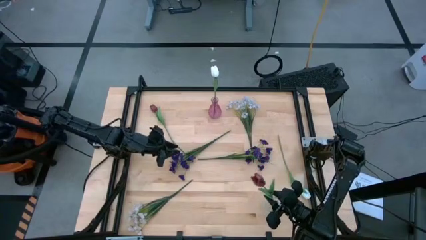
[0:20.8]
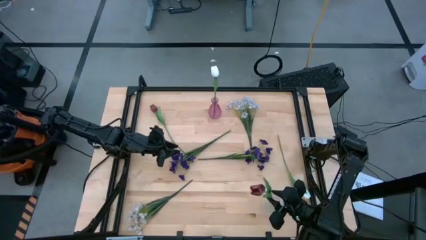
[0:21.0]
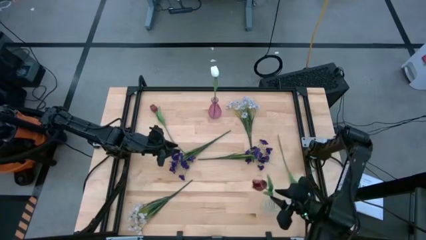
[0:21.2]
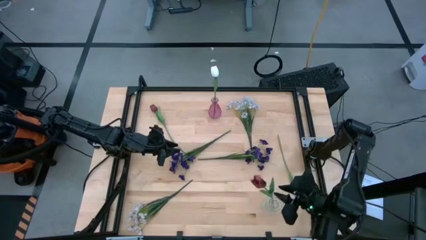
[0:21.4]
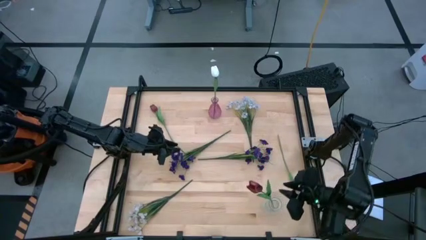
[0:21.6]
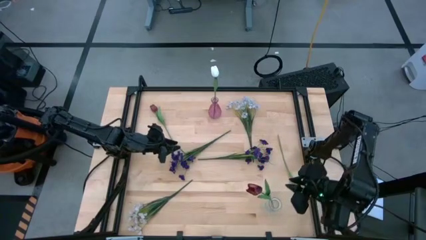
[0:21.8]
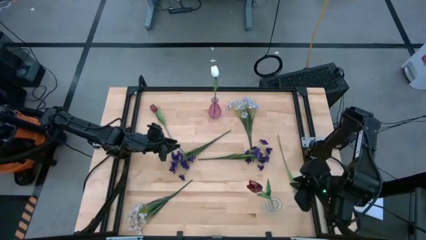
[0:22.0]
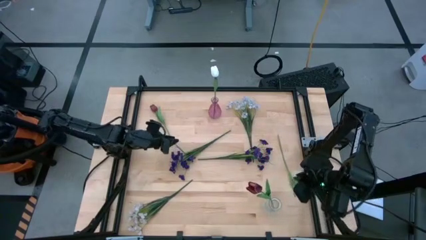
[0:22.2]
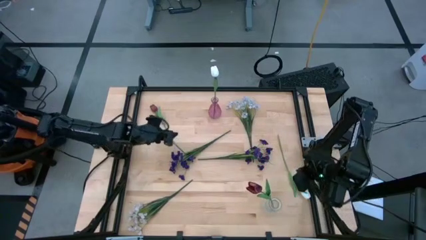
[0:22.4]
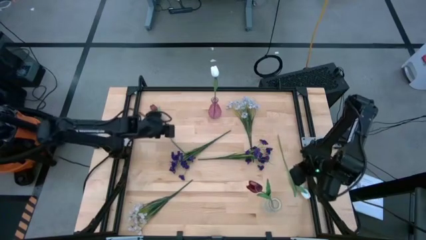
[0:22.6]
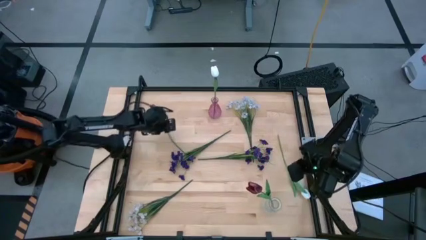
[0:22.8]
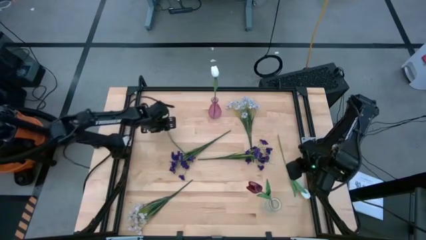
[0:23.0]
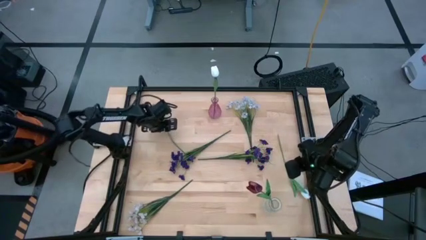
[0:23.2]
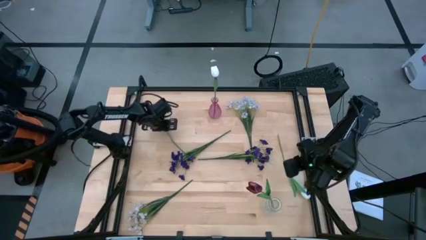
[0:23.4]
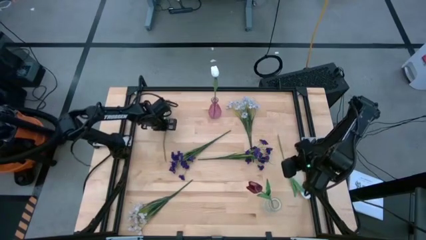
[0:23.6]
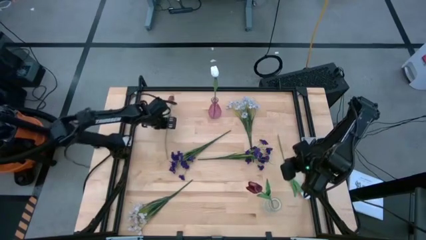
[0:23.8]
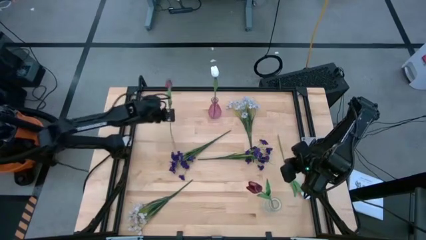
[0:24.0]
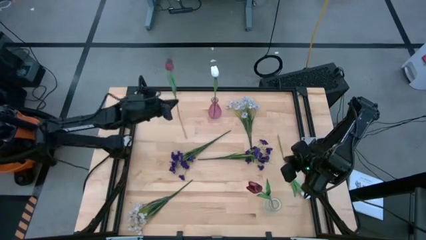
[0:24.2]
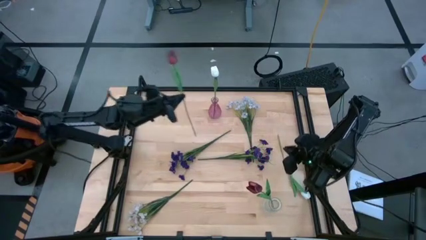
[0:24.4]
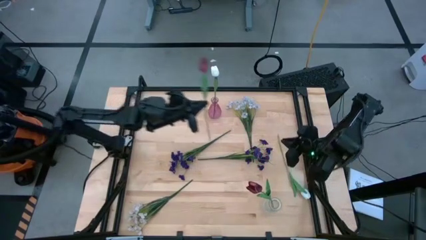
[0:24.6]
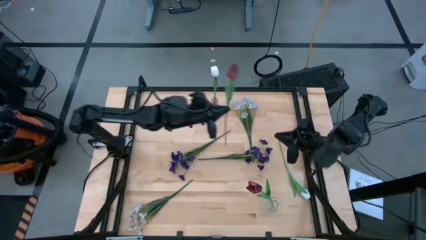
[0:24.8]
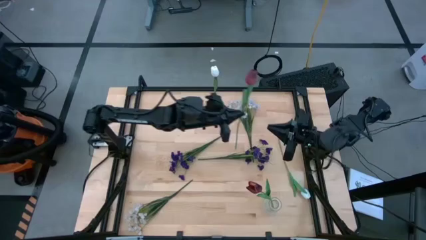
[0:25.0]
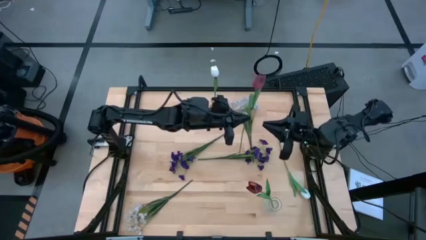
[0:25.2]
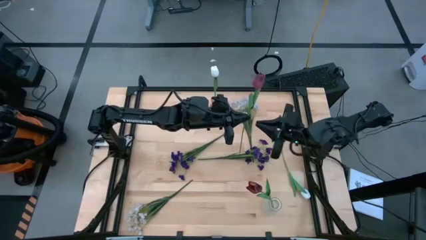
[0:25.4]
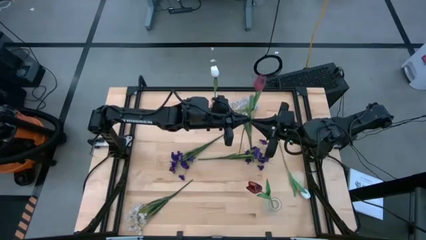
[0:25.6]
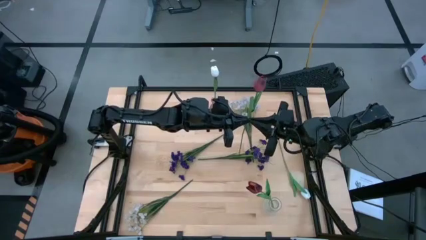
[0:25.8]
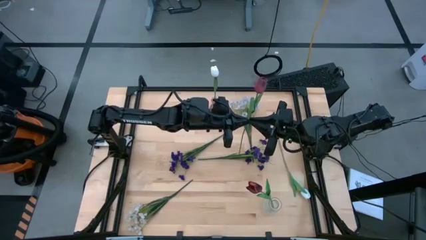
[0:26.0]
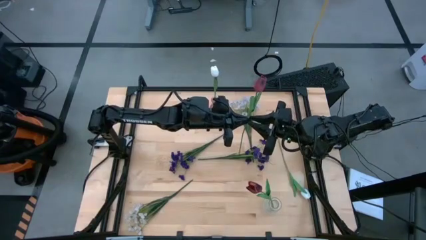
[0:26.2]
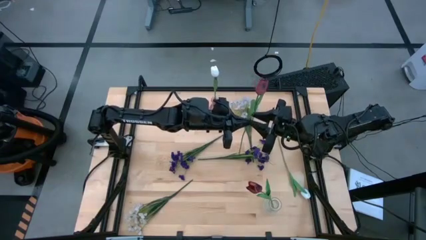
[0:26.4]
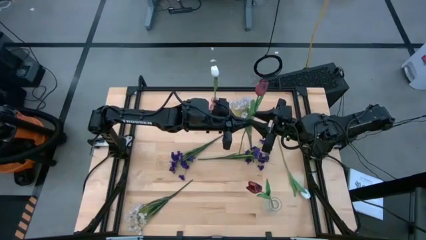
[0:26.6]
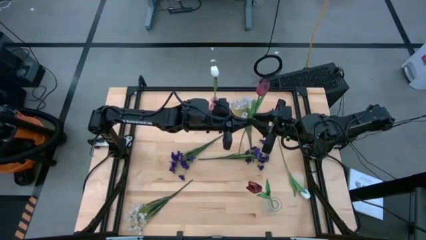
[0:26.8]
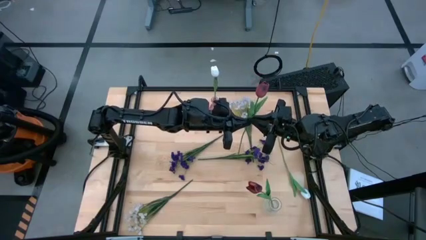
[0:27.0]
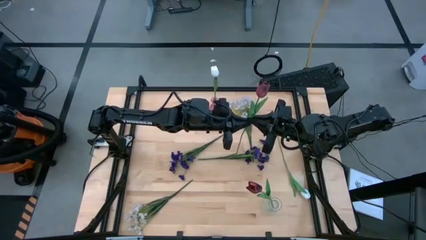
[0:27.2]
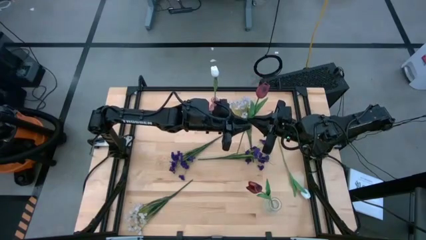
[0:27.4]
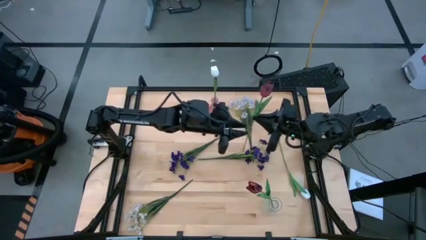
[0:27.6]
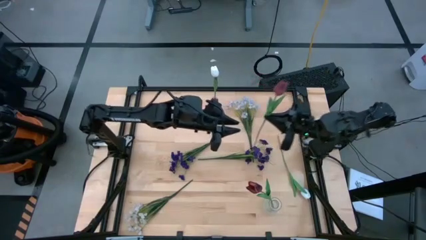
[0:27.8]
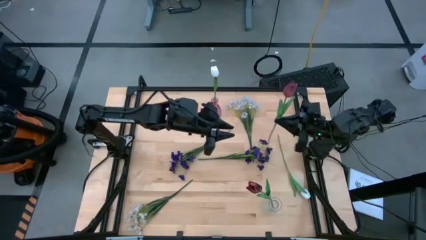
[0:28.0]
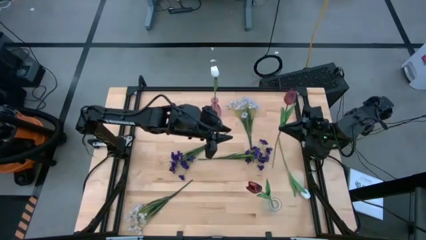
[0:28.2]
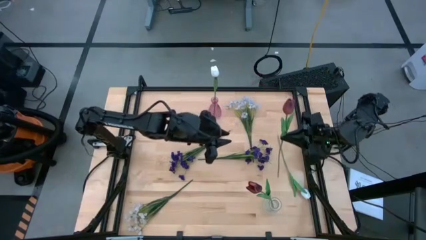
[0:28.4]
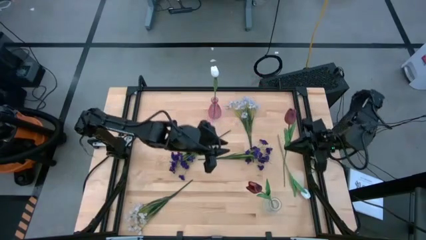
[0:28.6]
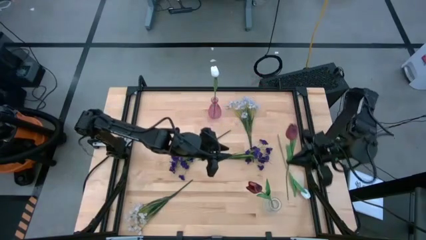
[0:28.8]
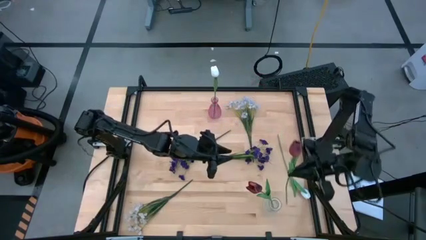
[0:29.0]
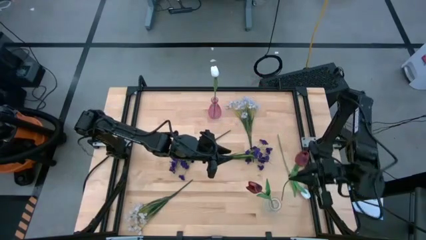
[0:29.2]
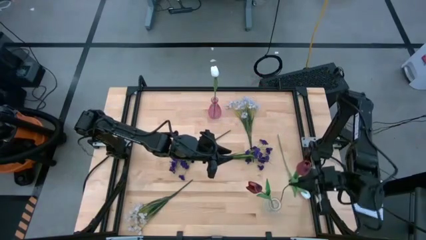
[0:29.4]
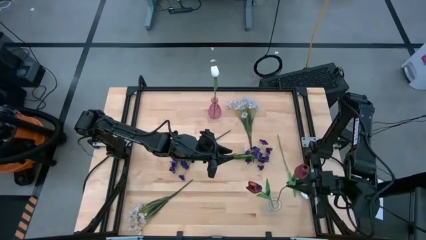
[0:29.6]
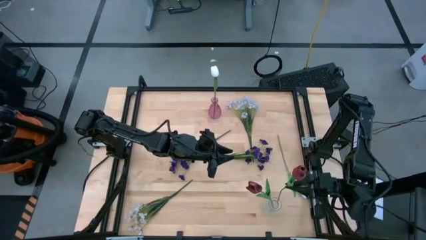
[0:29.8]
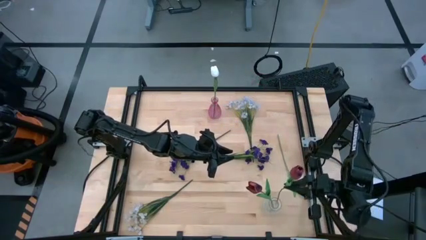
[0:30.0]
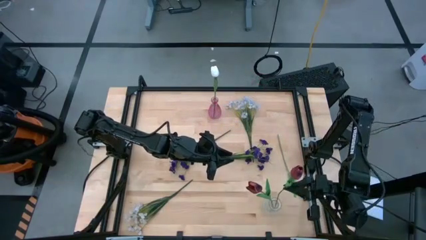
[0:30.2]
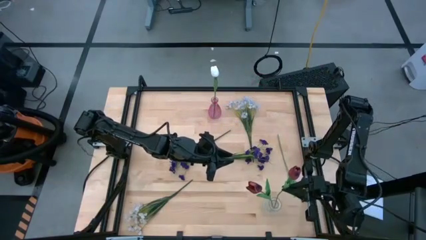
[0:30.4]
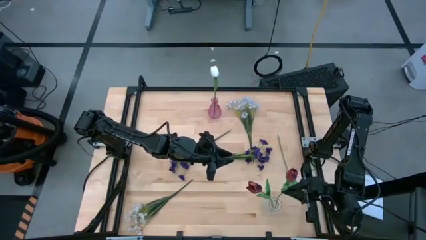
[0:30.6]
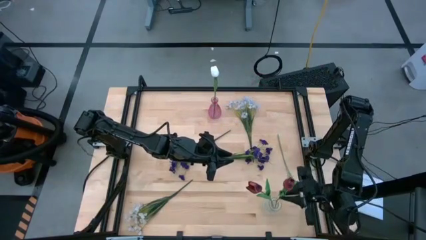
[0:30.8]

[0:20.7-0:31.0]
Task: Sort flowers into vase by color
Put the red tulip into the transparent vase

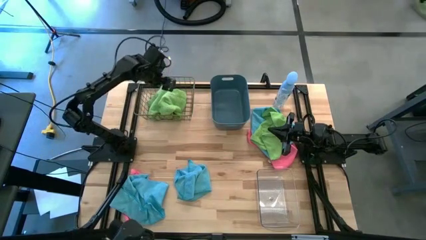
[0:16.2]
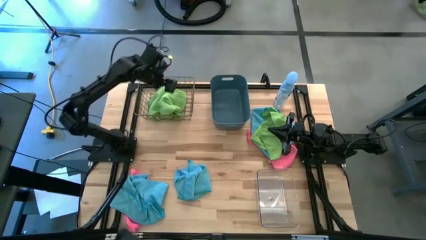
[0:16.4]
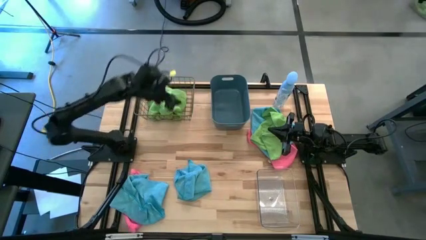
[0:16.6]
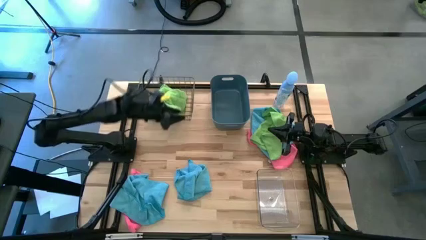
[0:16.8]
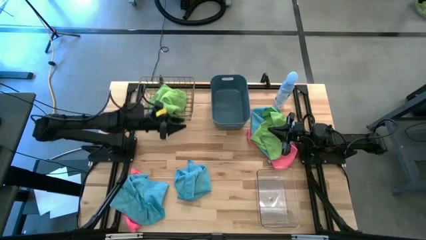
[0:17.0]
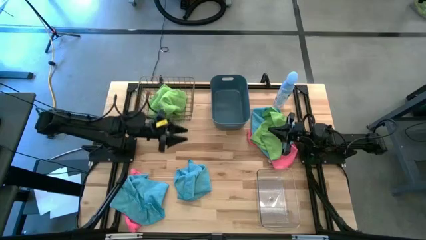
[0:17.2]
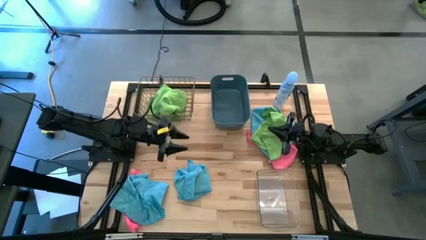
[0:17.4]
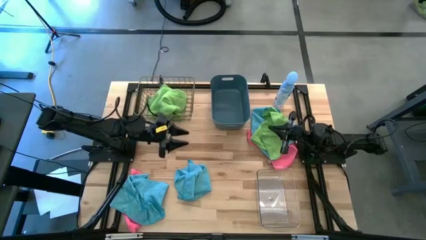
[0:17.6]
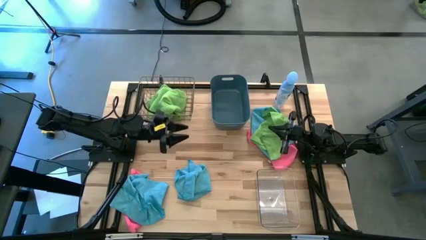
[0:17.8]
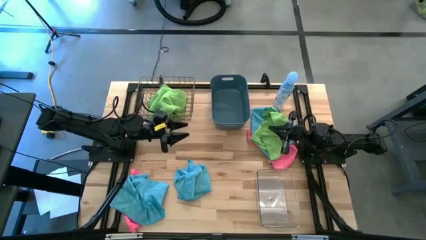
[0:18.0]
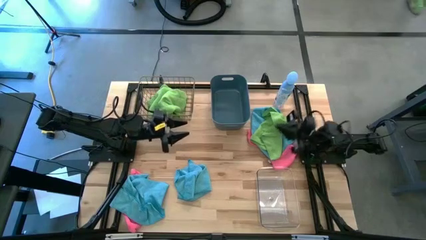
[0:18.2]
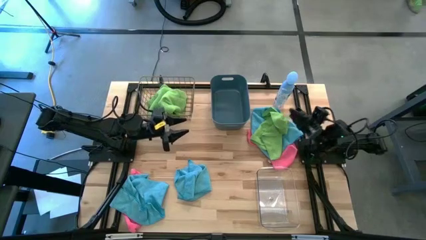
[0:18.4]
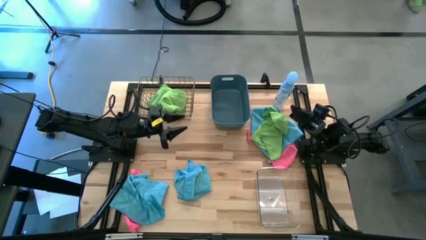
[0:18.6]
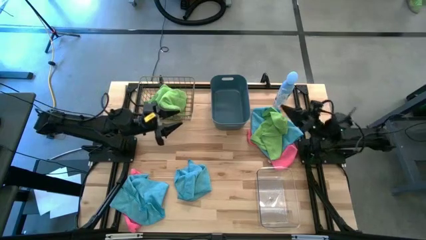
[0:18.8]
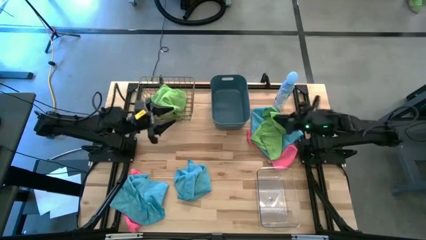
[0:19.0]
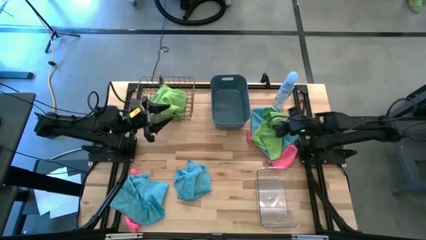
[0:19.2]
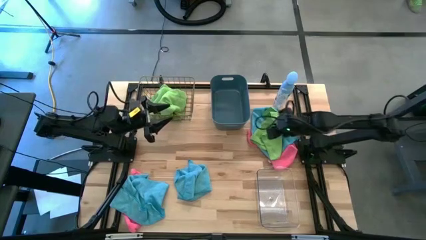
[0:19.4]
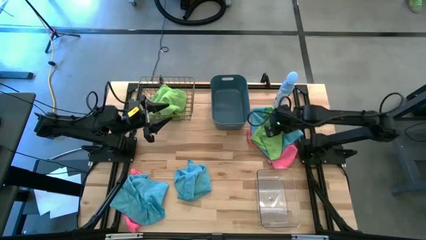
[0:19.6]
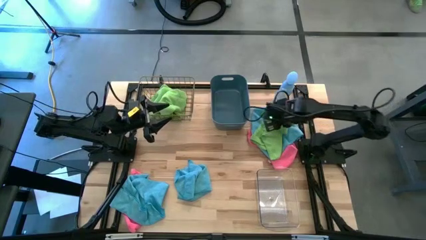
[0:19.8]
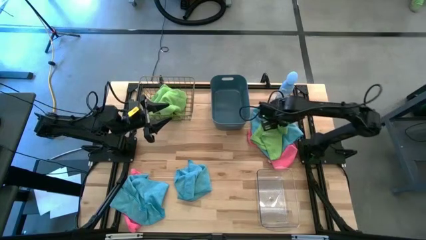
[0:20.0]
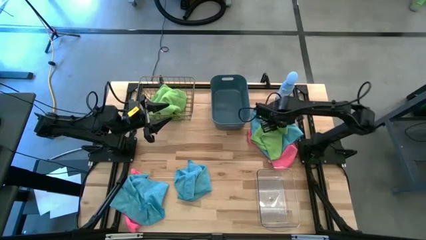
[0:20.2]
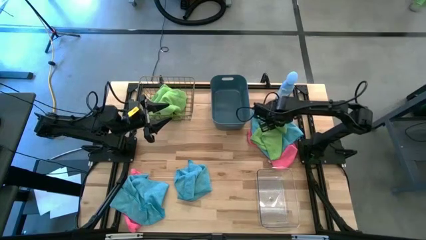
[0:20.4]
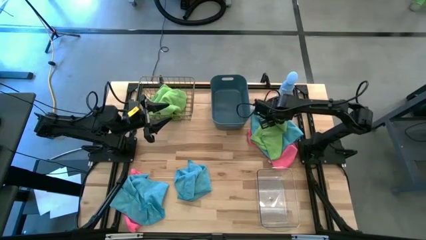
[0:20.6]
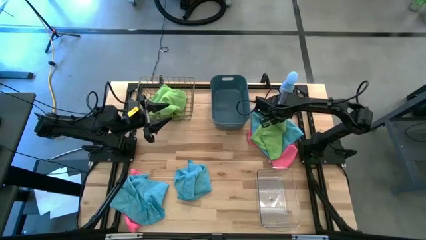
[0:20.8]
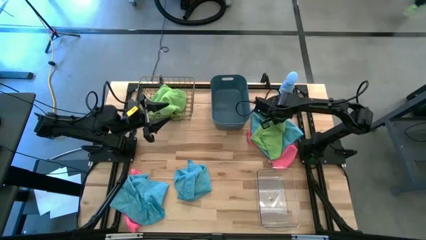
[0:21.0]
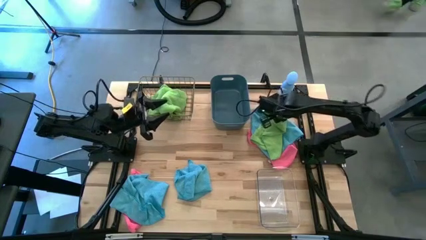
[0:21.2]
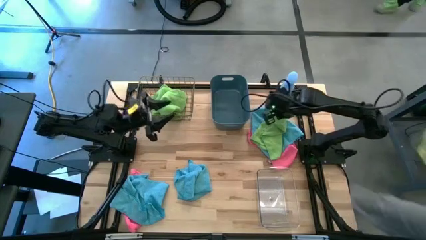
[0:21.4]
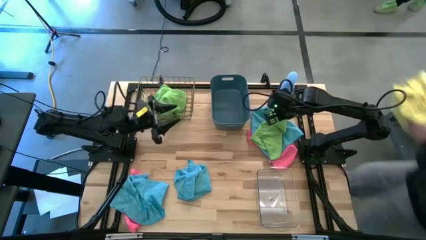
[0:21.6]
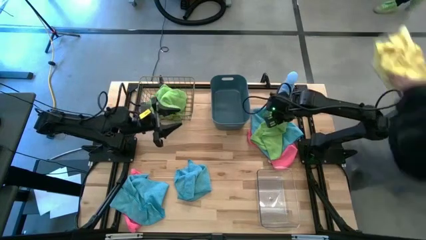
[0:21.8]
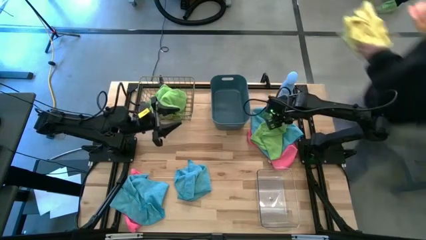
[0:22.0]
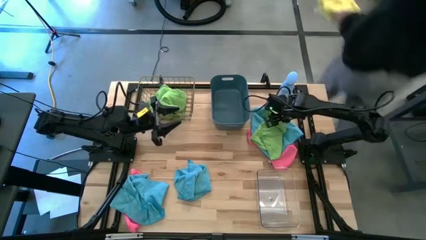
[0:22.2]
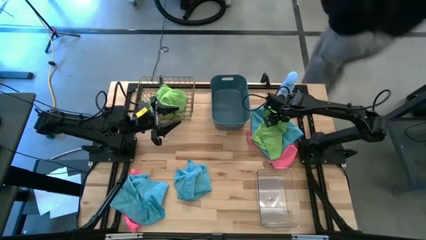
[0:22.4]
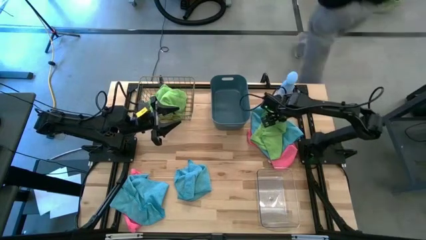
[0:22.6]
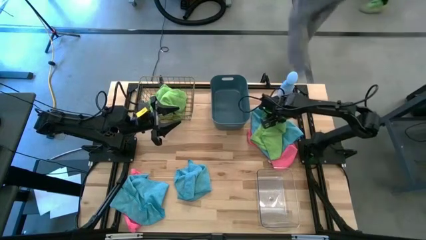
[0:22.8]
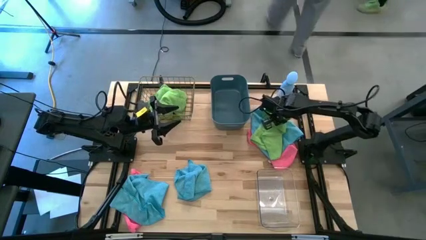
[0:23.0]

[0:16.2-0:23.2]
Task: Sort microfiber towel by color & place in baskets
Put the green microfiber cloth into the wire bin
